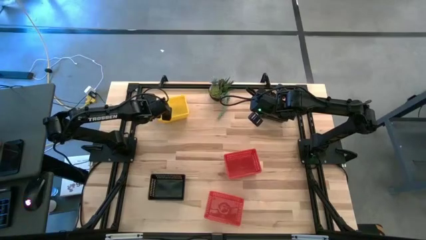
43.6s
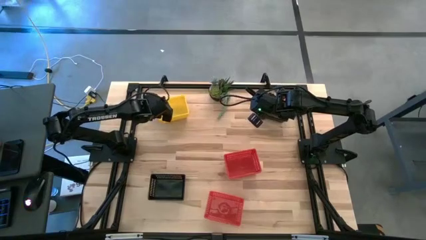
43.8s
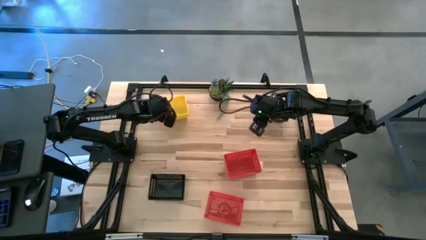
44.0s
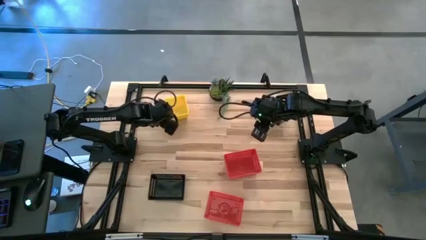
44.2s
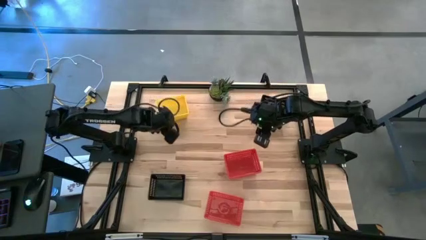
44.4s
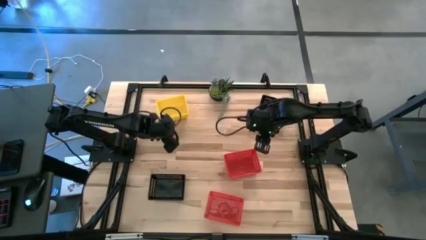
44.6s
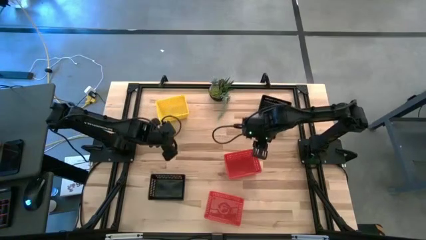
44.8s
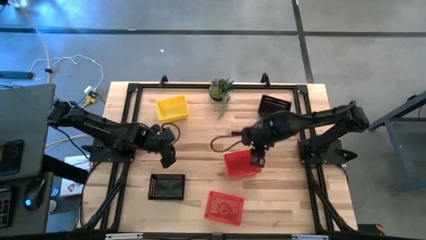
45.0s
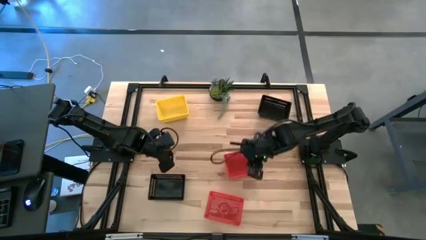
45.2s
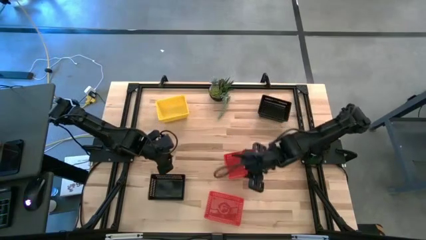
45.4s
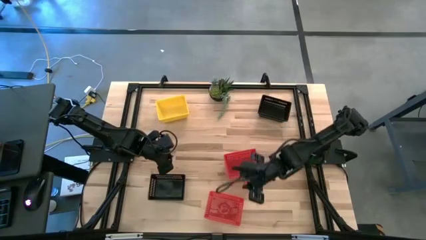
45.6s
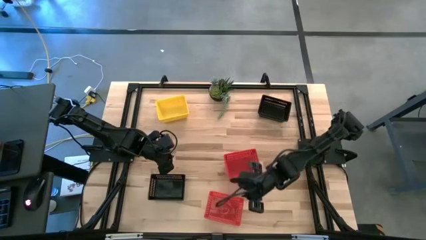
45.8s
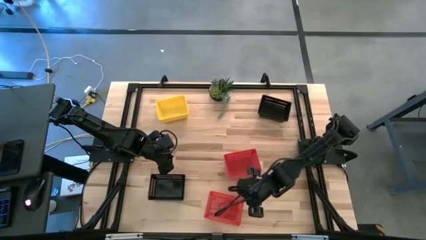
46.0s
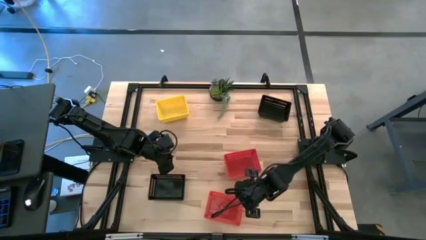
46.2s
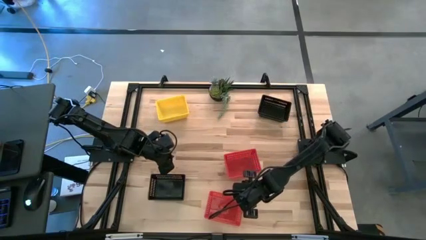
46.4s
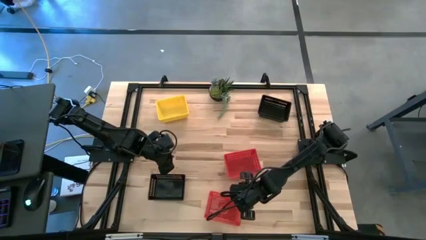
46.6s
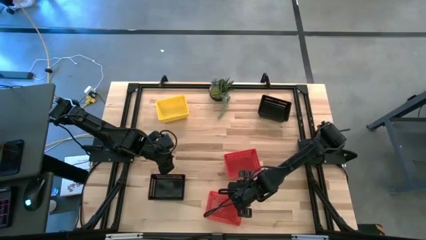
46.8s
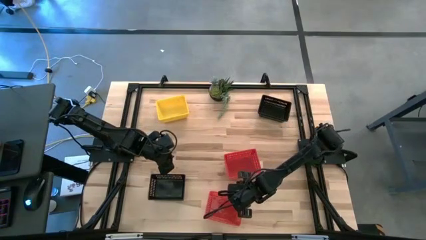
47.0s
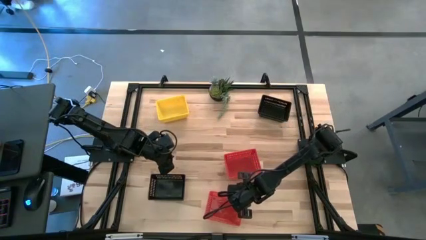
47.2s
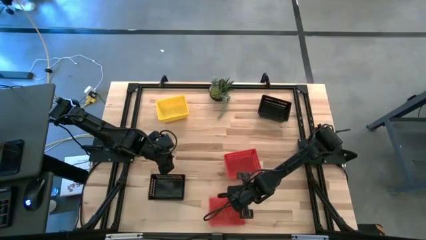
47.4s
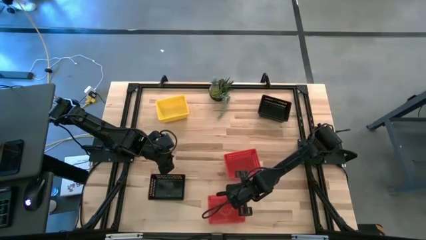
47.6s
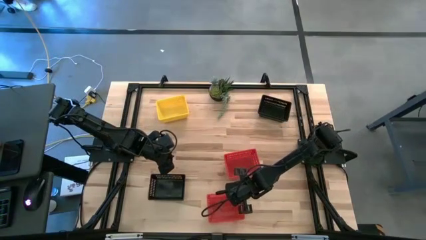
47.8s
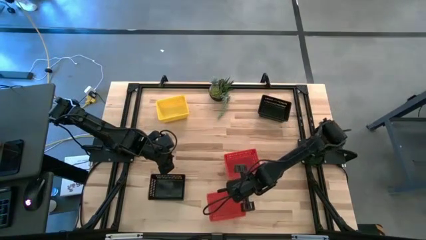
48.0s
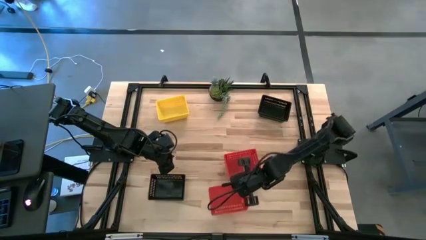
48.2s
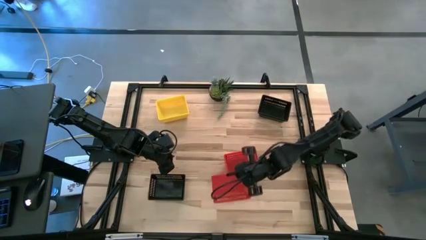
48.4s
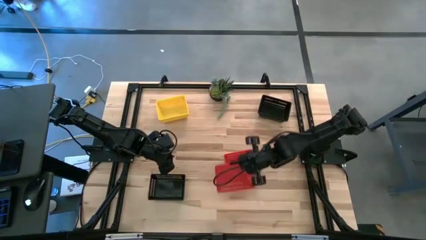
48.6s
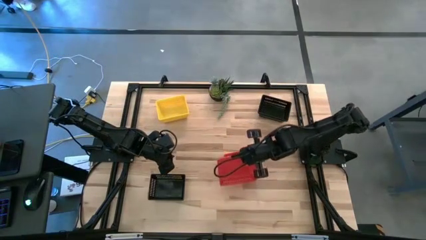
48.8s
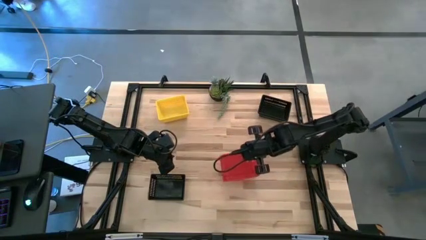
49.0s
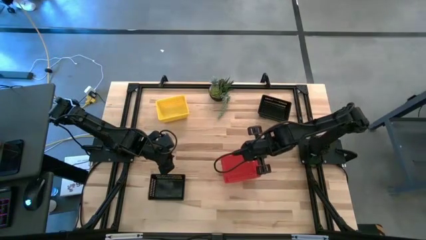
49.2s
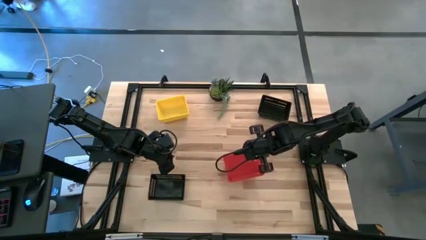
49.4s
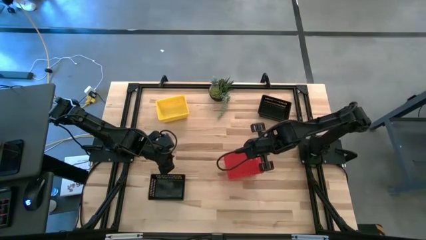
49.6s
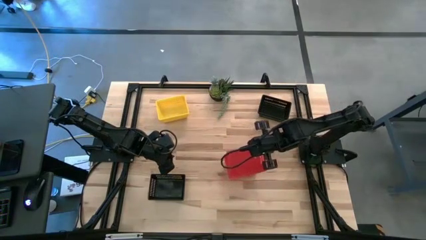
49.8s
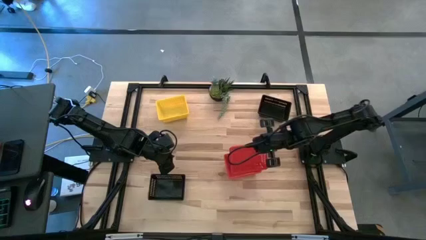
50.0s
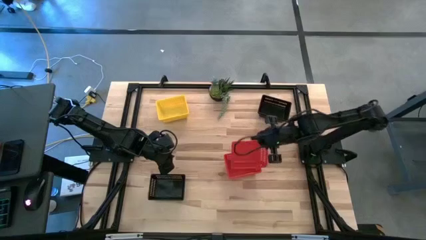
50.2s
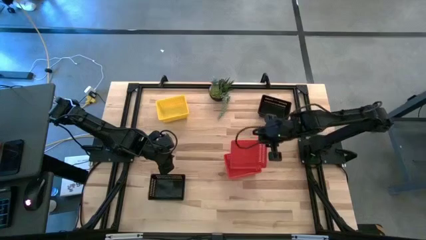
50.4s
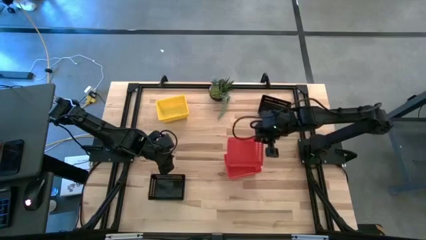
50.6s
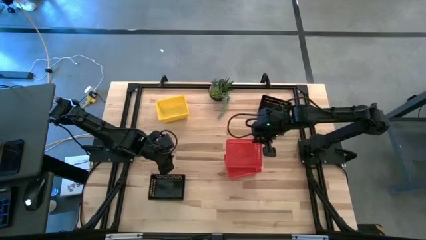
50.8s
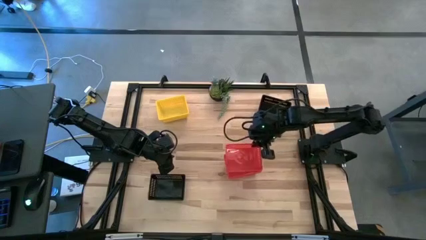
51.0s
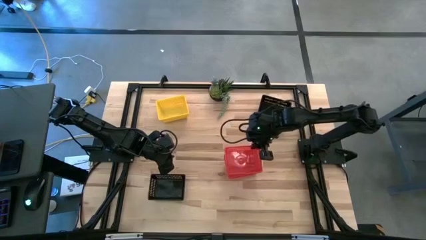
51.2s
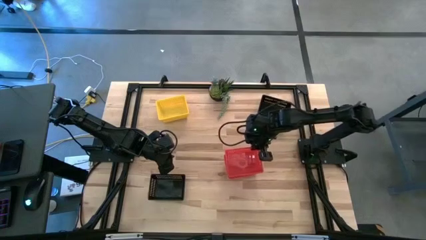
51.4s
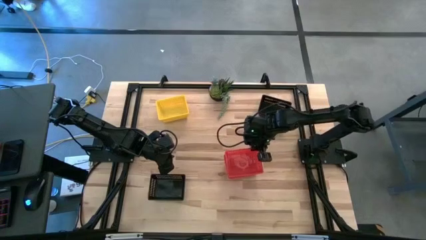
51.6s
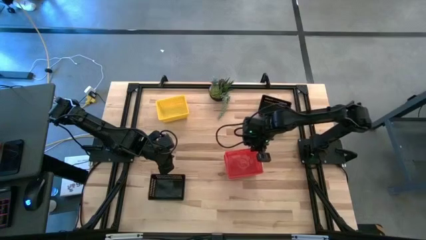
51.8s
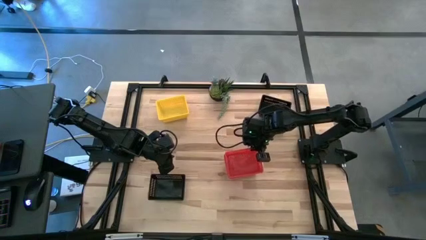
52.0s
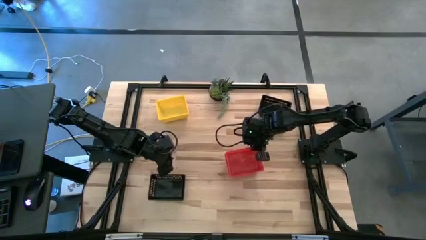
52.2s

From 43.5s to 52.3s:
Stack the bottom red bin on top of the top red bin on the table

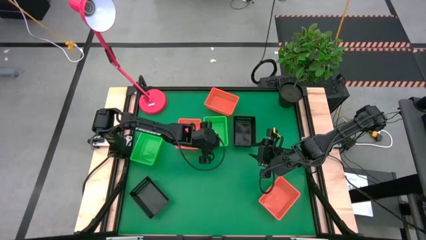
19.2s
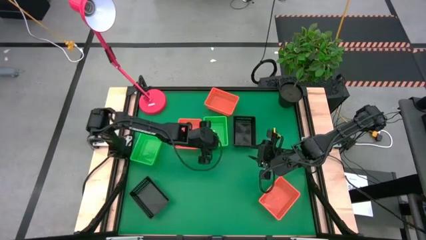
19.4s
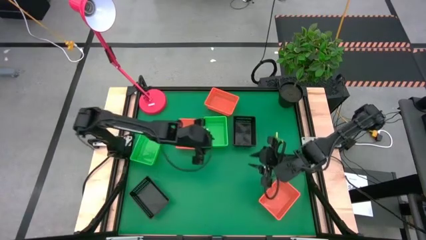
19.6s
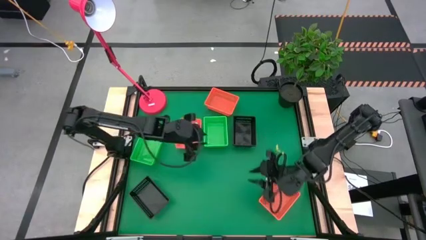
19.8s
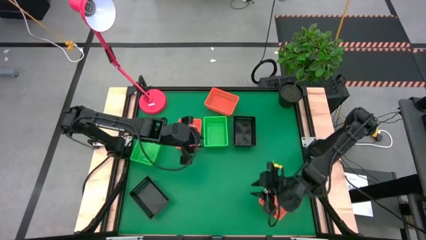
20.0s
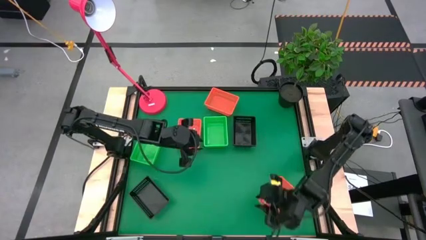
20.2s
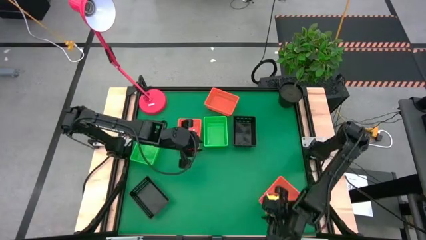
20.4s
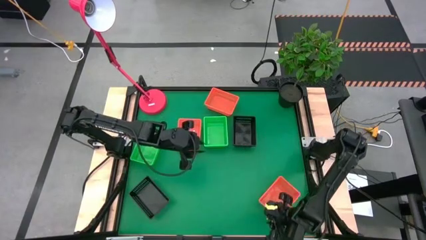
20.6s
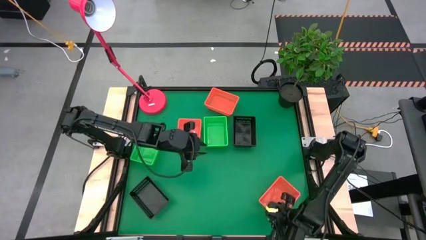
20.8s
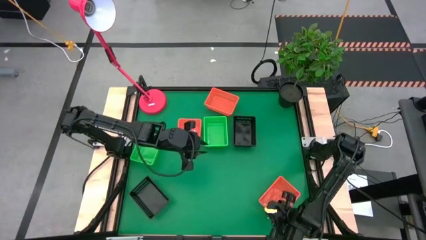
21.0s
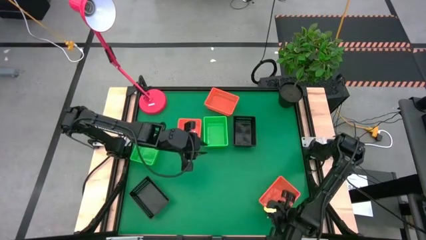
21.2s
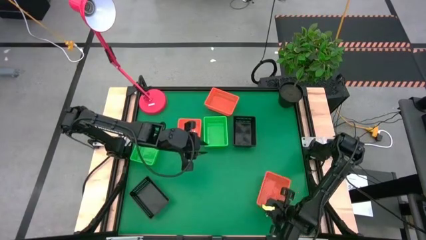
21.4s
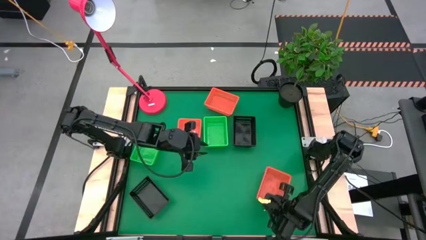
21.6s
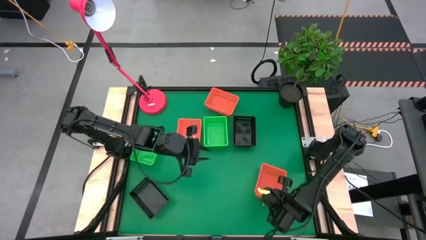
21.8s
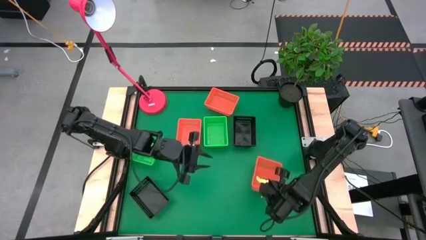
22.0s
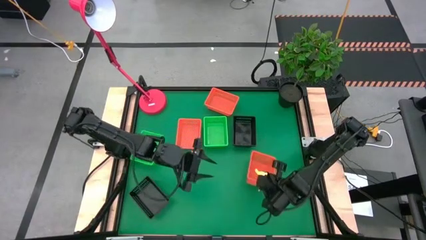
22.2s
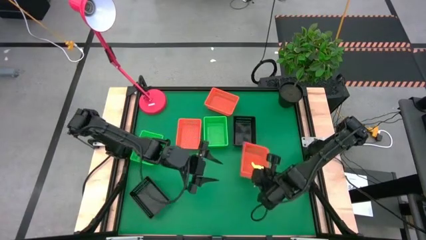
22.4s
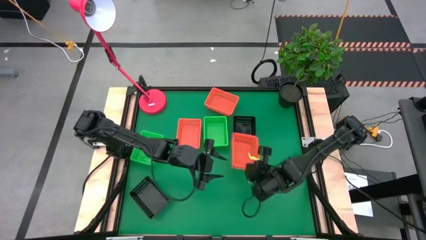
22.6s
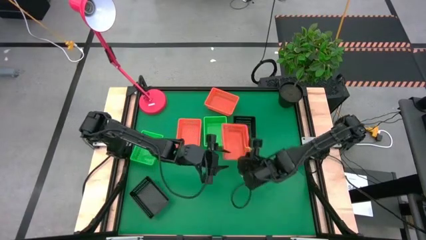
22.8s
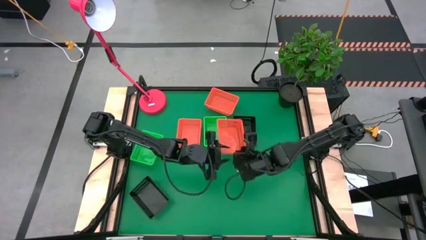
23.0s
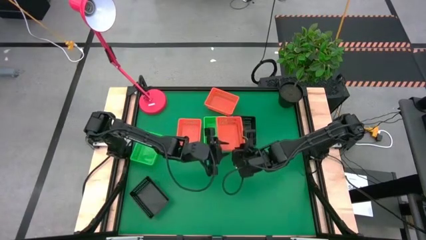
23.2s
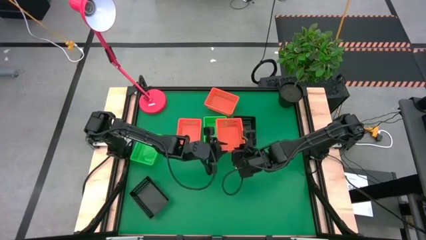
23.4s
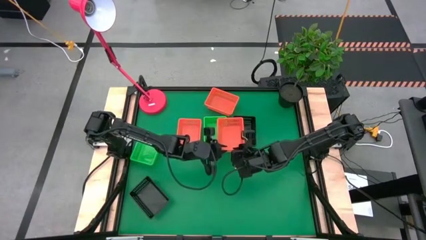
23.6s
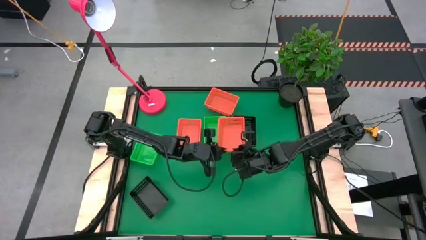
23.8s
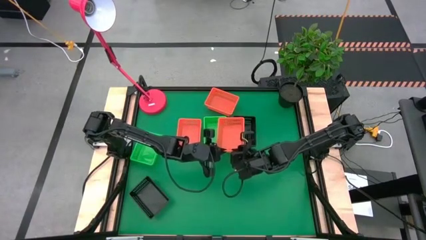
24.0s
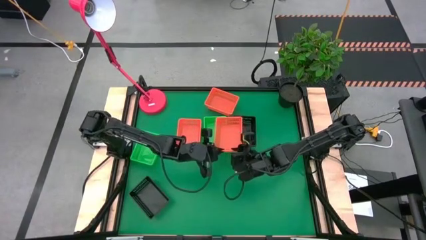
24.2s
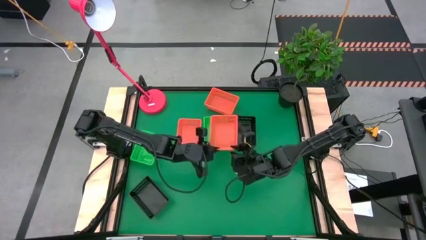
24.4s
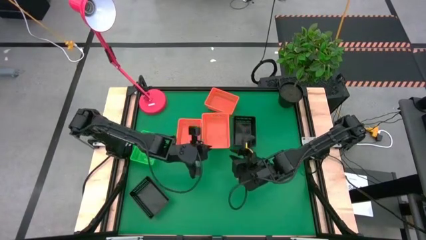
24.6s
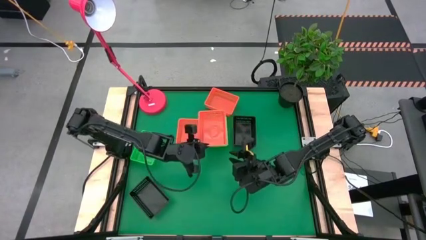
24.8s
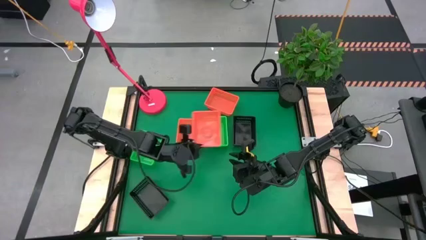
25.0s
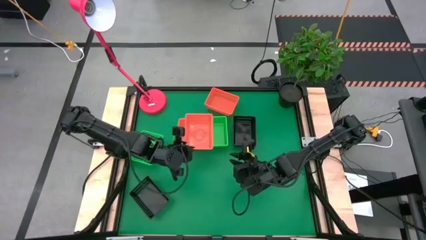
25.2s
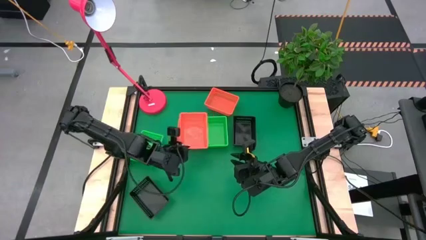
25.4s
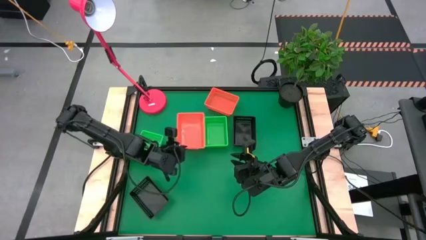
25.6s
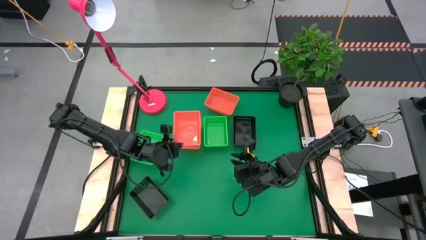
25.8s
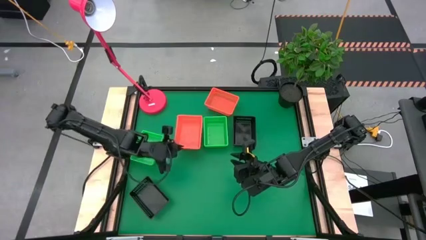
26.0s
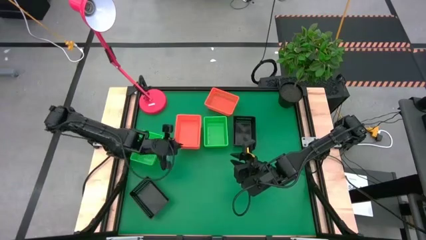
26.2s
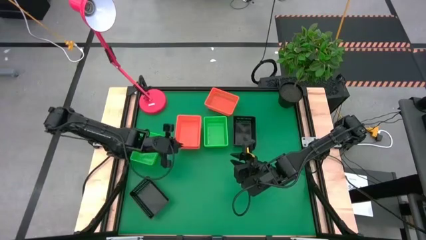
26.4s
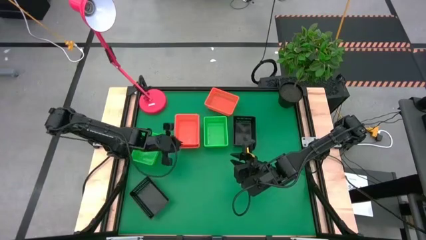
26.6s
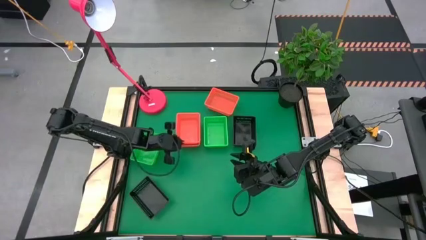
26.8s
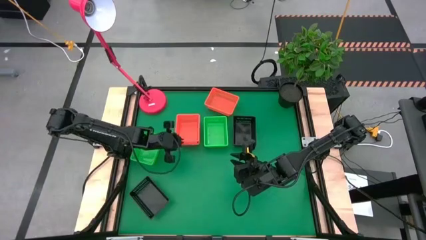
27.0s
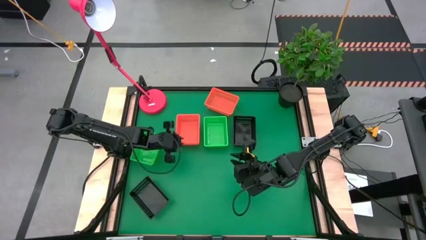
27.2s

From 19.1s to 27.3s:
Stack the bottom orange basket on top of the other middle orange basket
